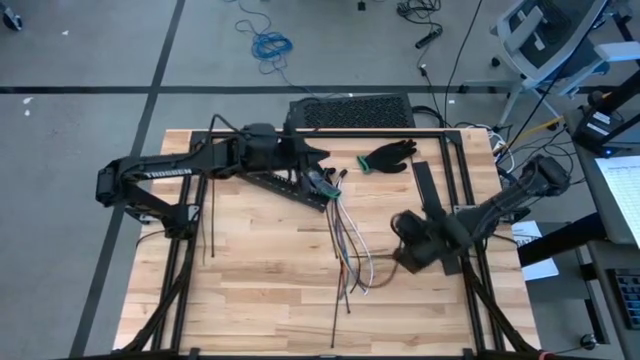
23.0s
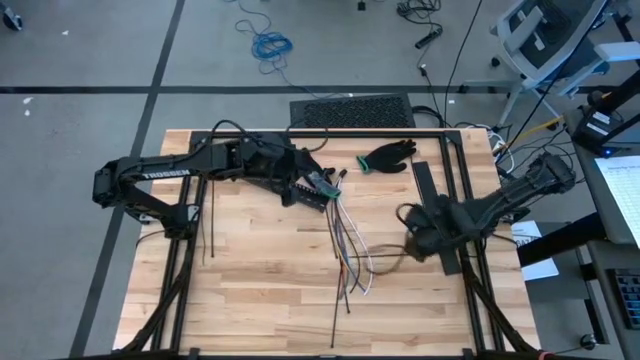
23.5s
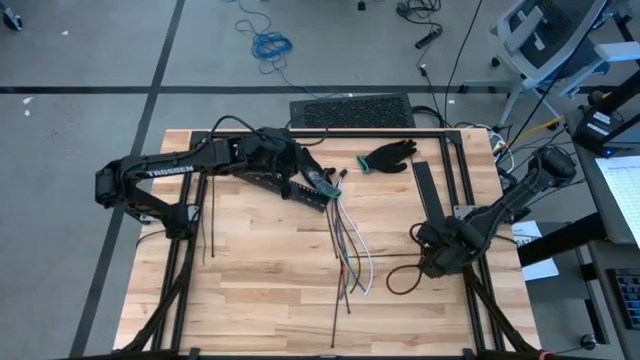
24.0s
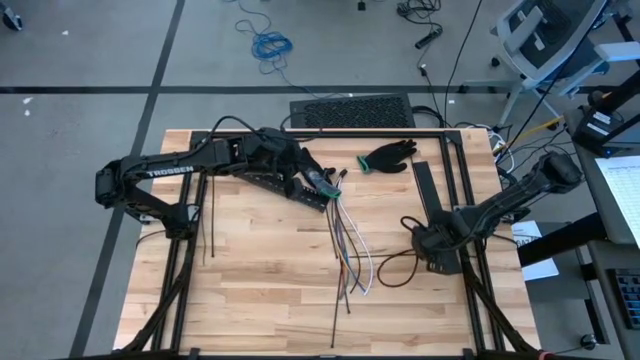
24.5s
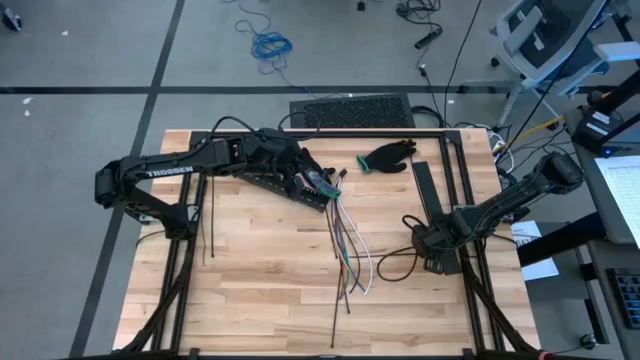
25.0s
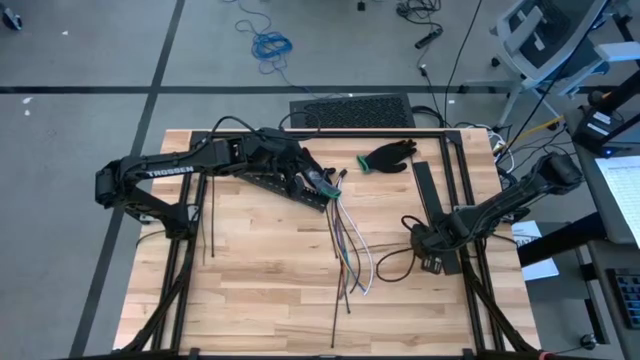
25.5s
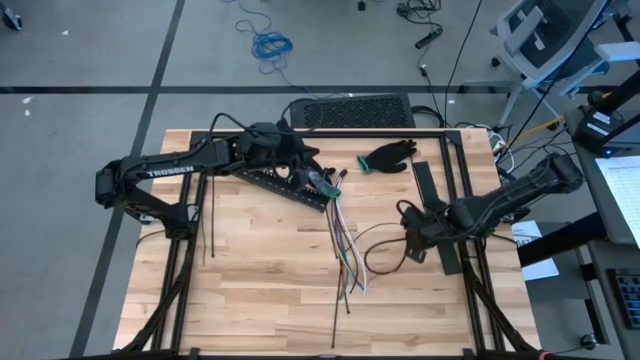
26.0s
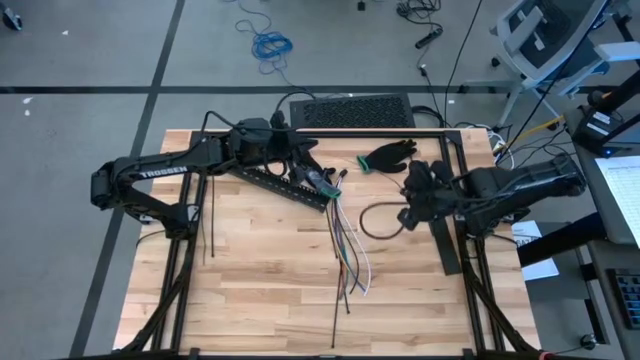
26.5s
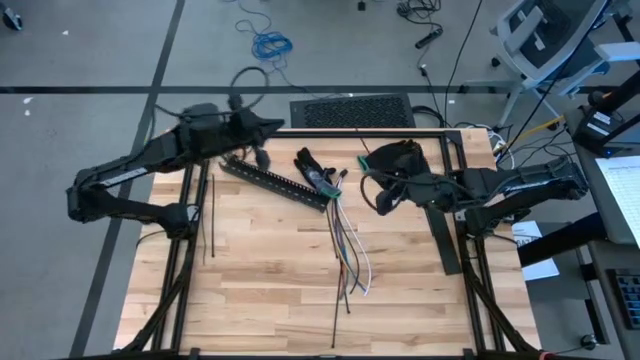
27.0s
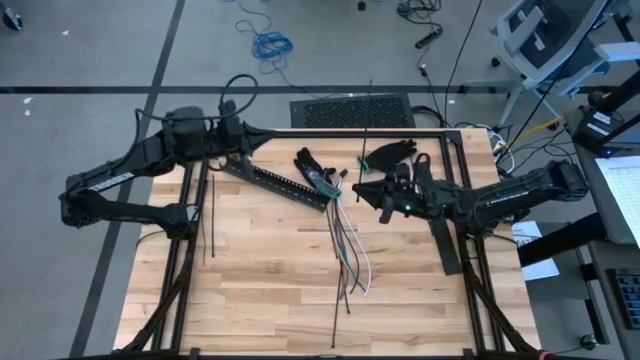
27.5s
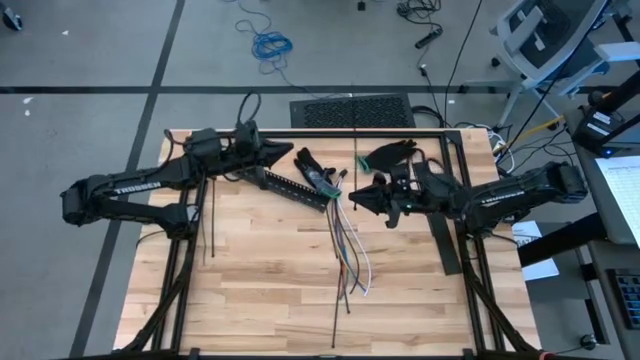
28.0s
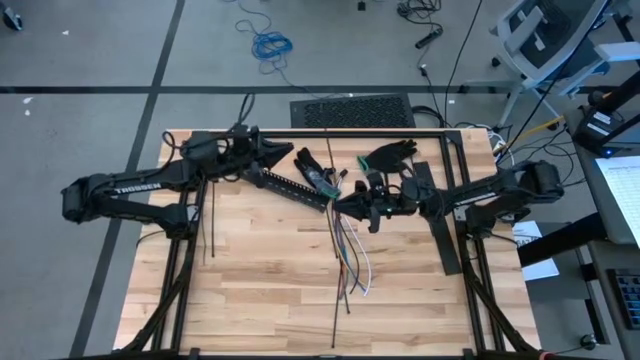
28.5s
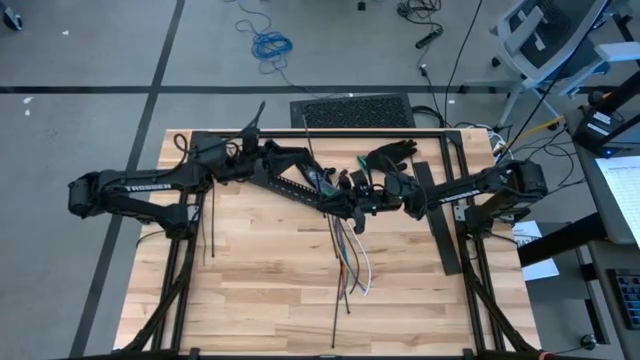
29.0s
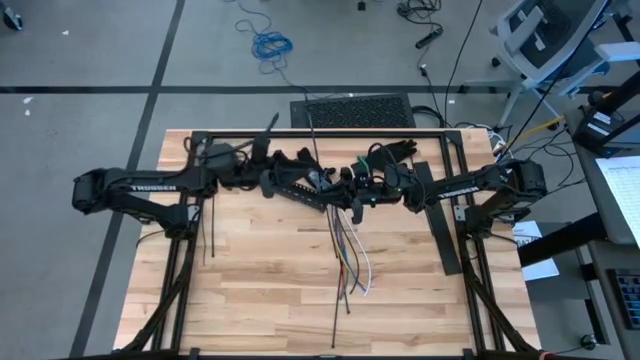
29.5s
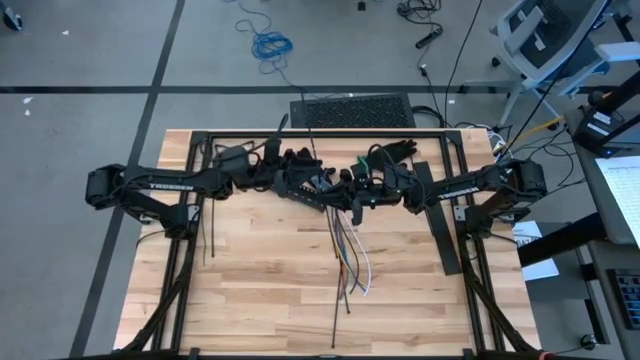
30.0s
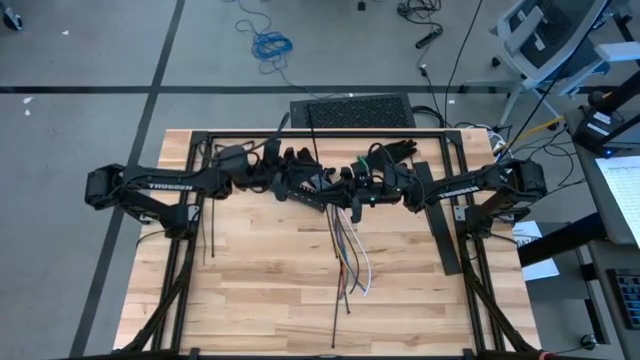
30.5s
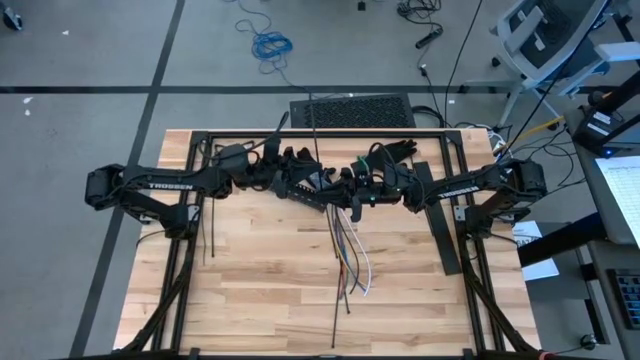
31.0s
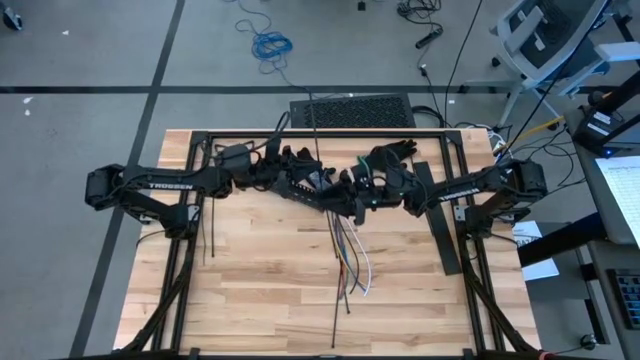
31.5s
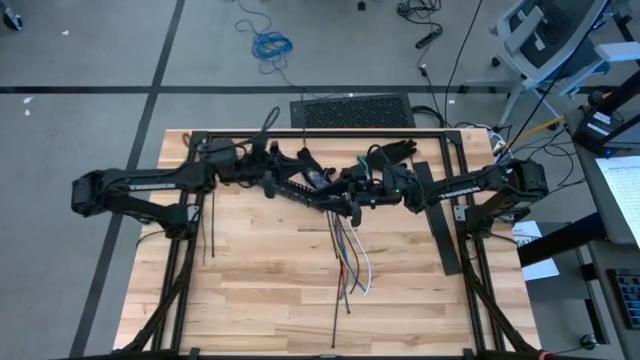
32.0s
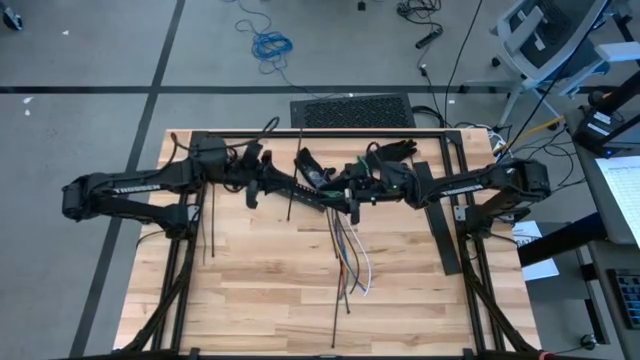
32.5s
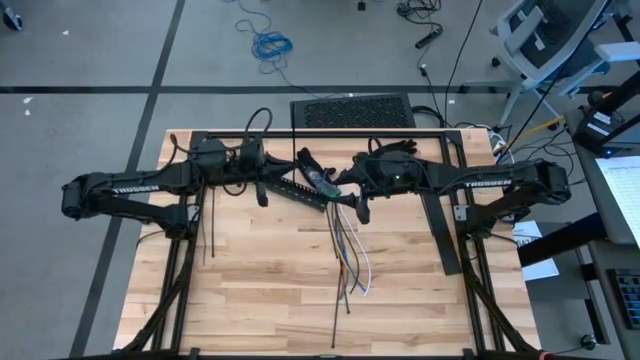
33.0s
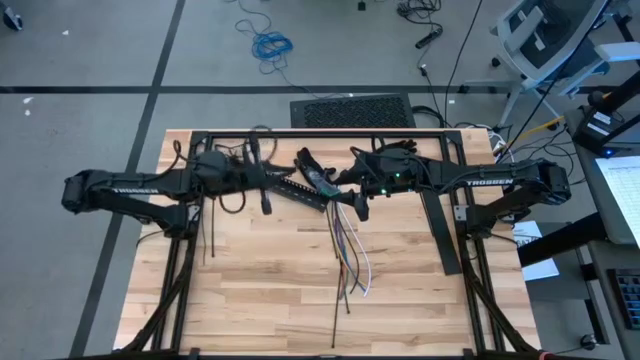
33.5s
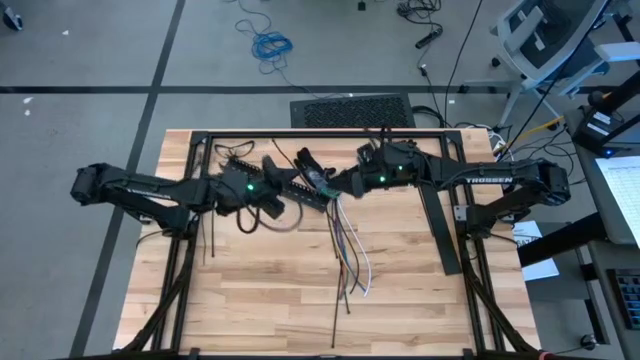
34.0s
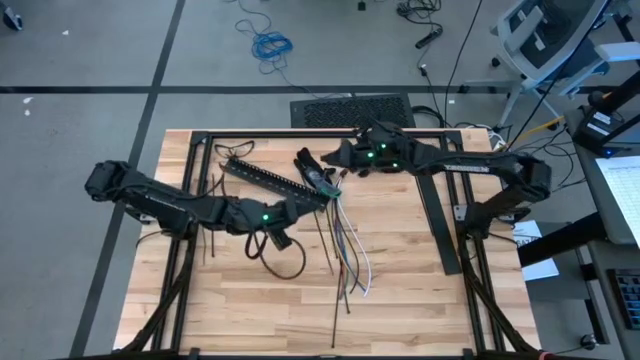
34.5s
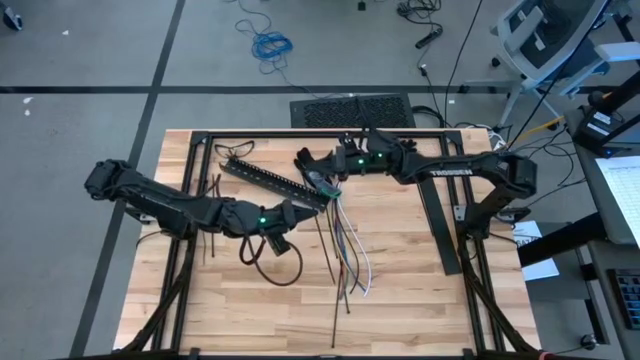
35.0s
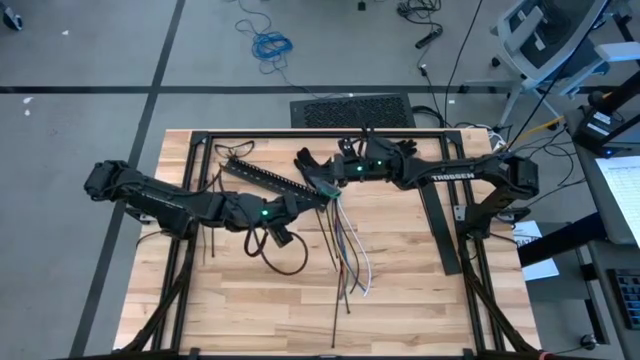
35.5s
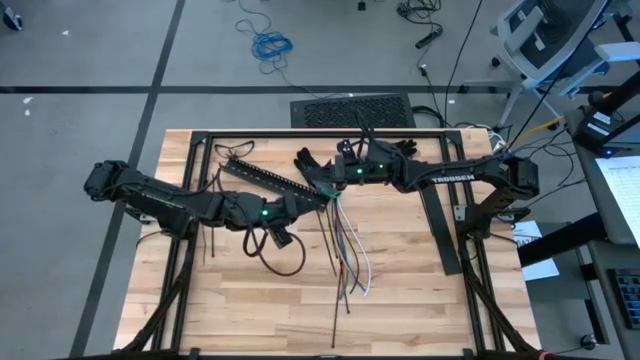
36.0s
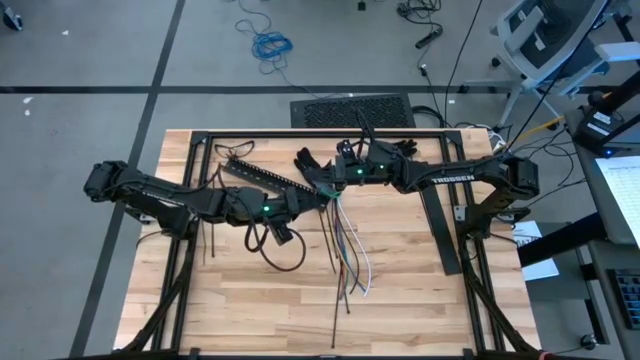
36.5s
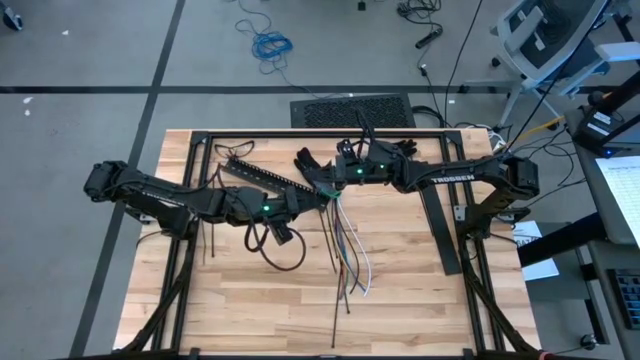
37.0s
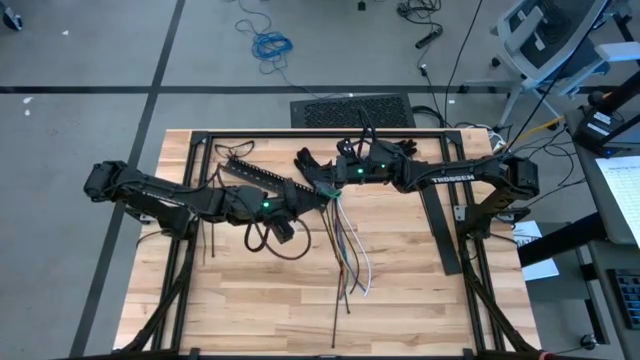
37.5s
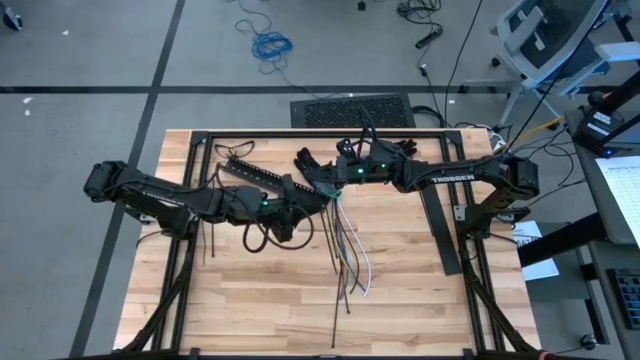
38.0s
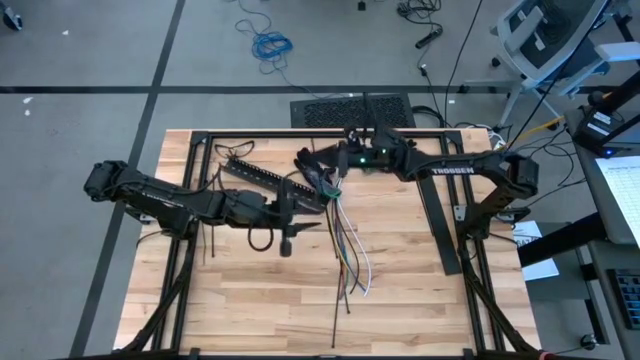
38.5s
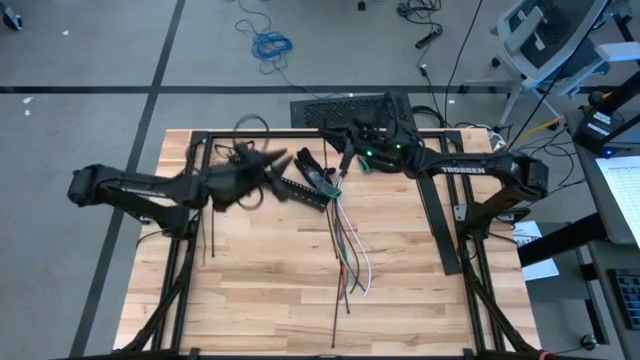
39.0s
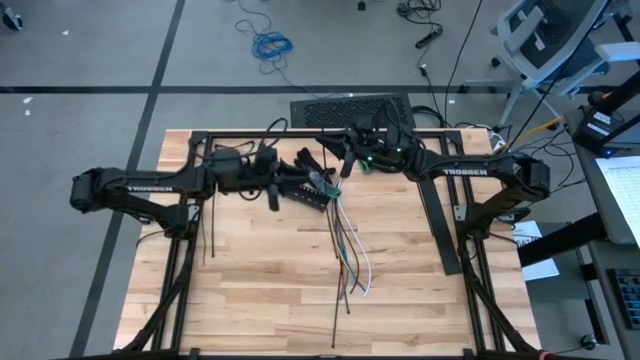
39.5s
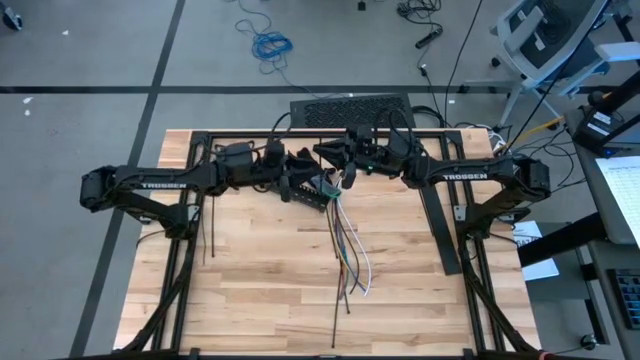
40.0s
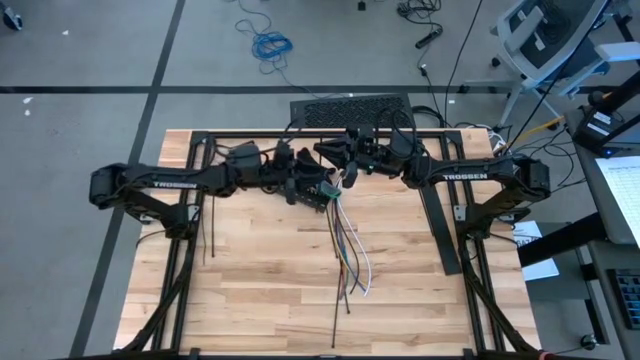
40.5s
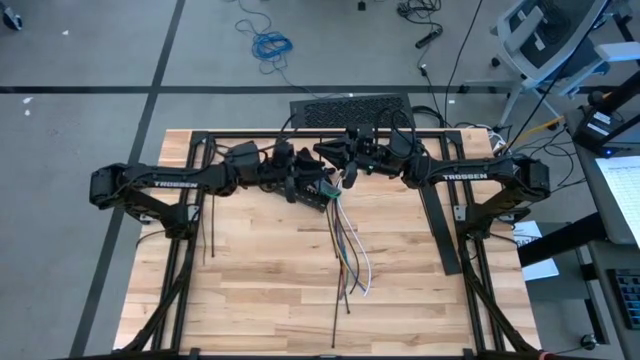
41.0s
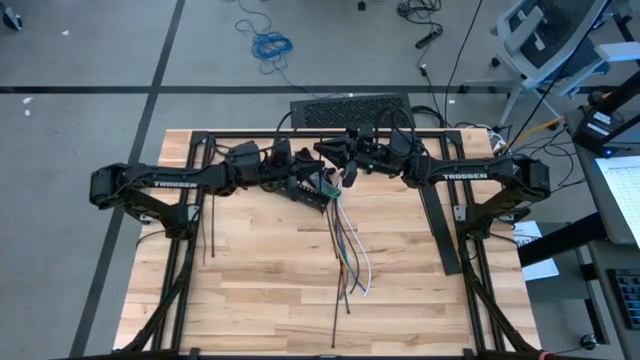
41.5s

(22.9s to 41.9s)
Task: Ziptie cables
Insert the black zip tie into the lock head
